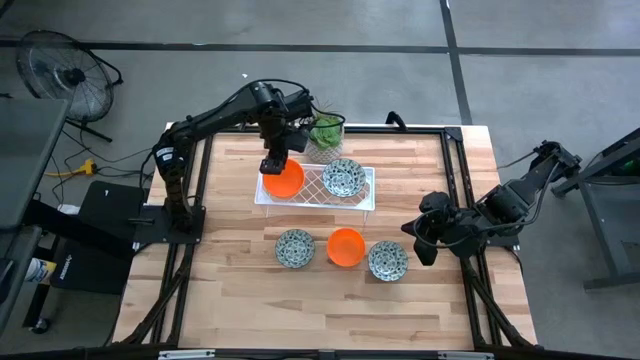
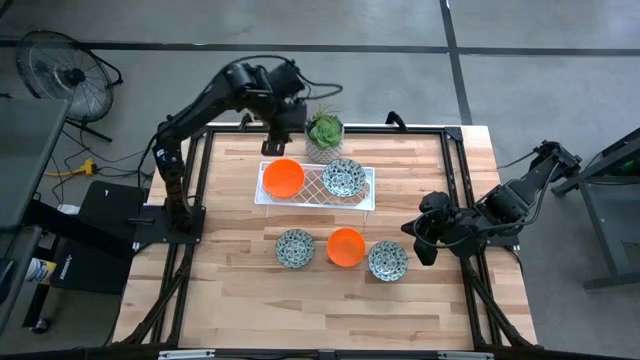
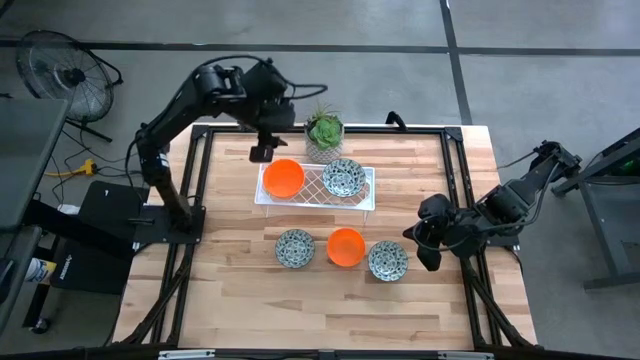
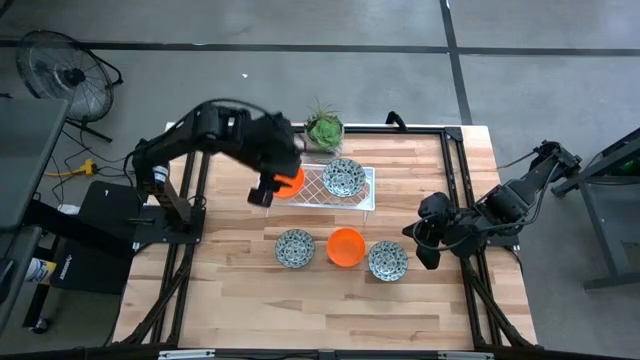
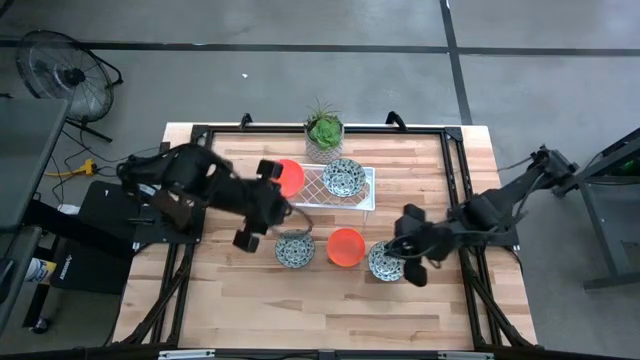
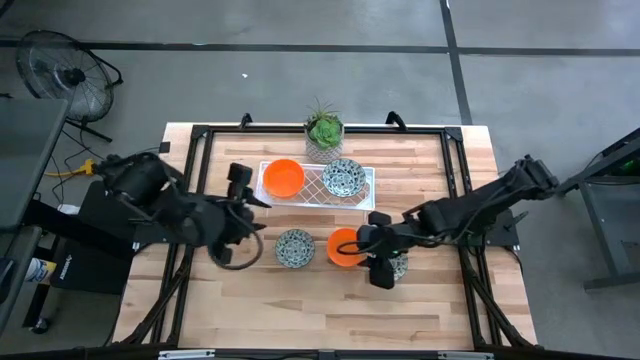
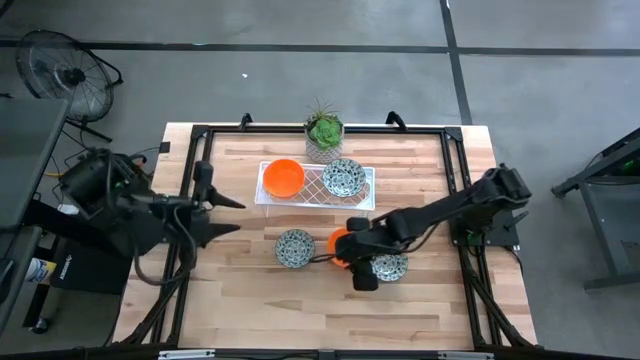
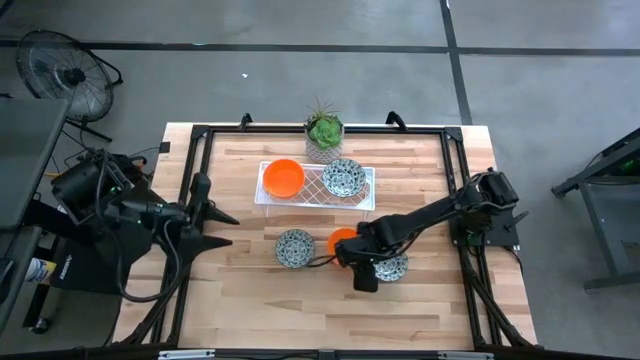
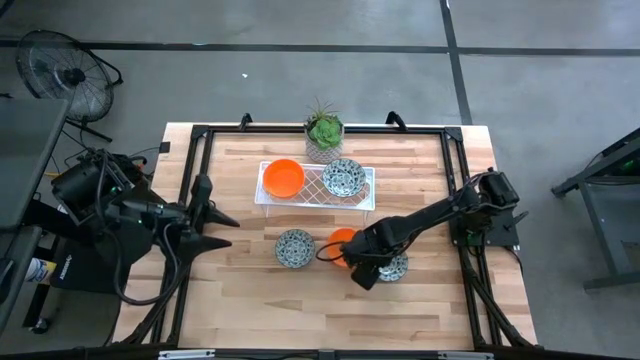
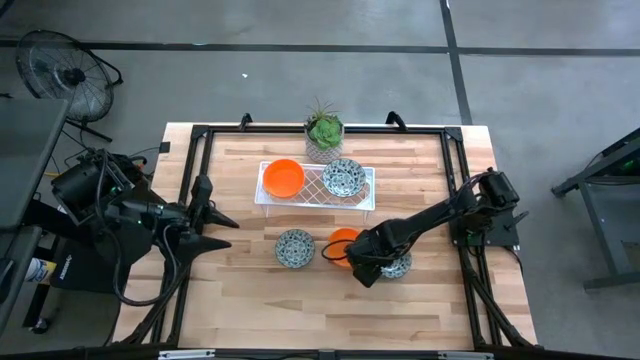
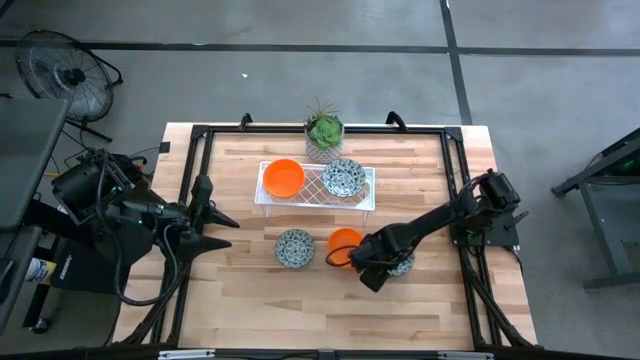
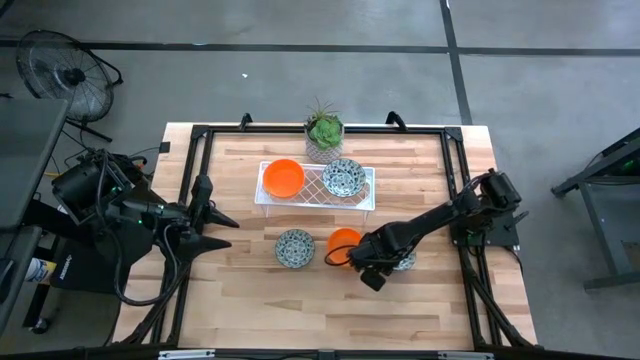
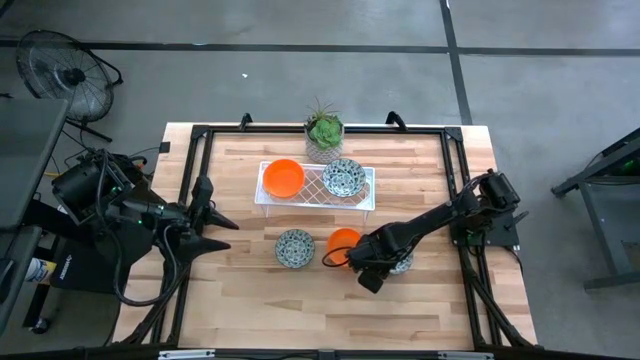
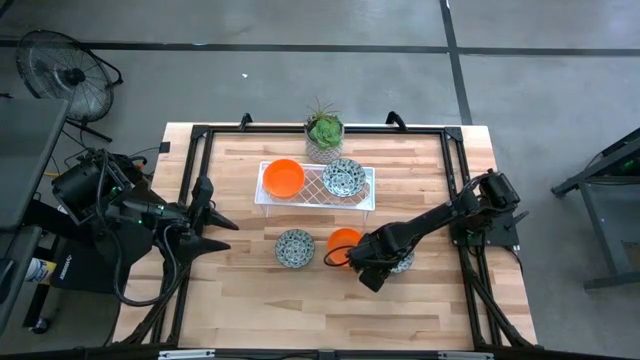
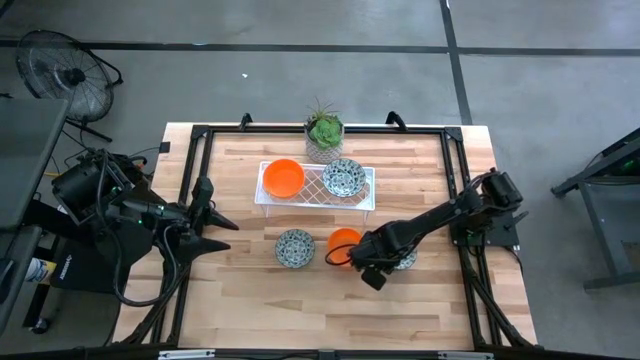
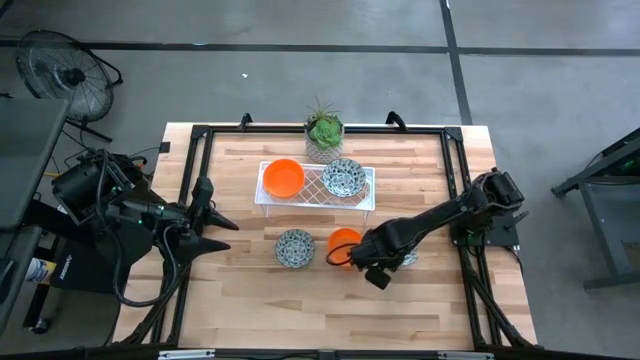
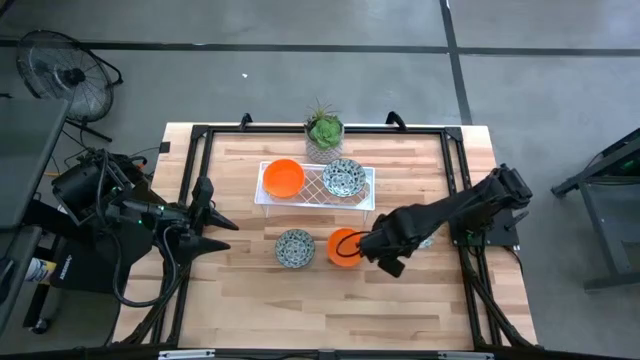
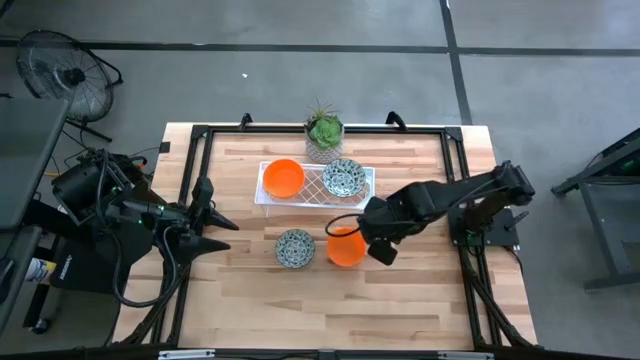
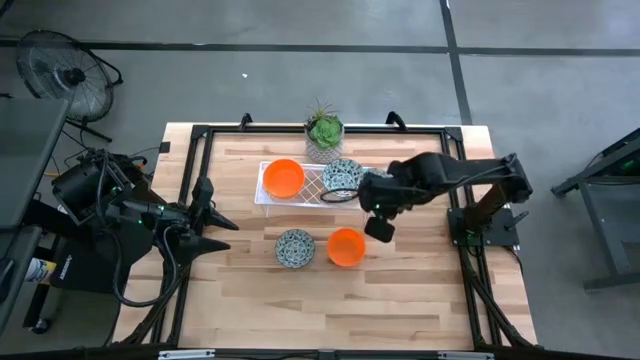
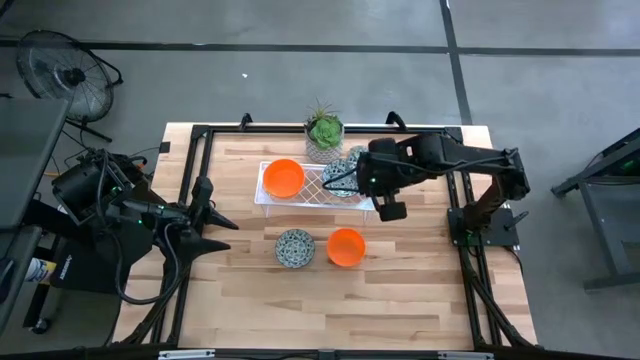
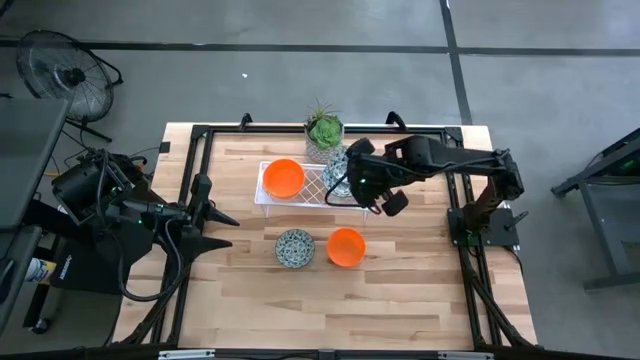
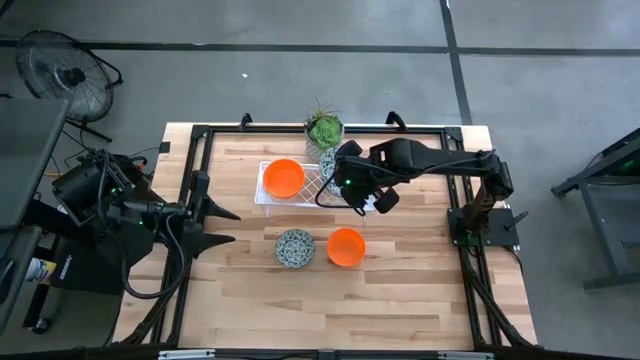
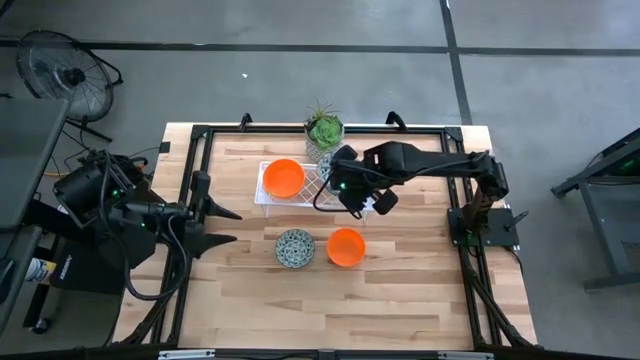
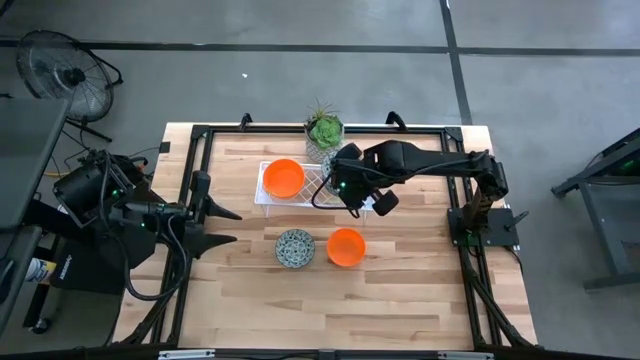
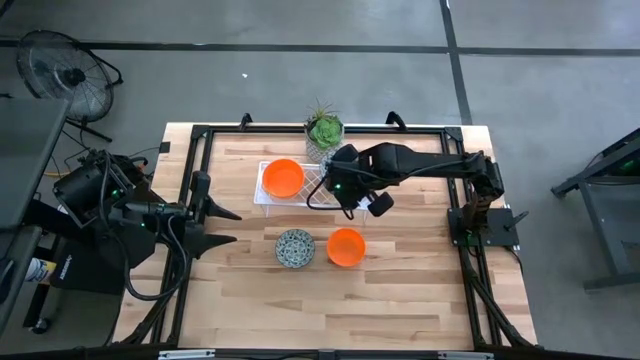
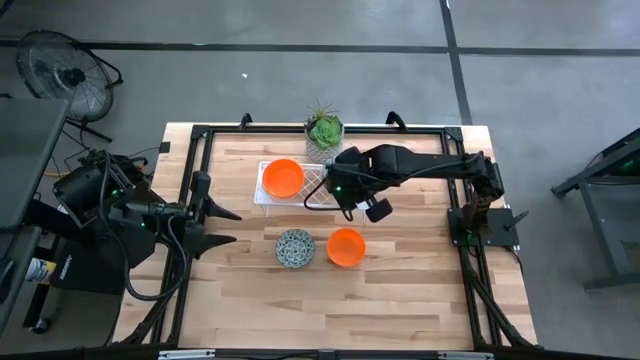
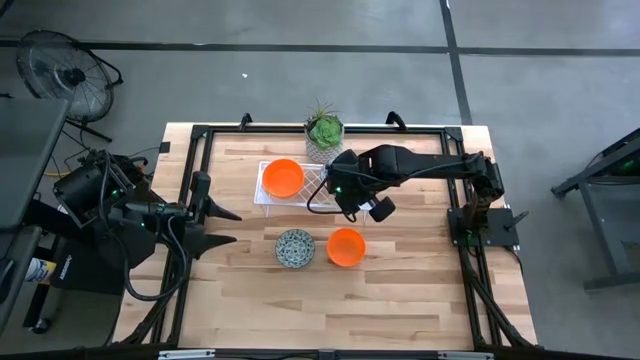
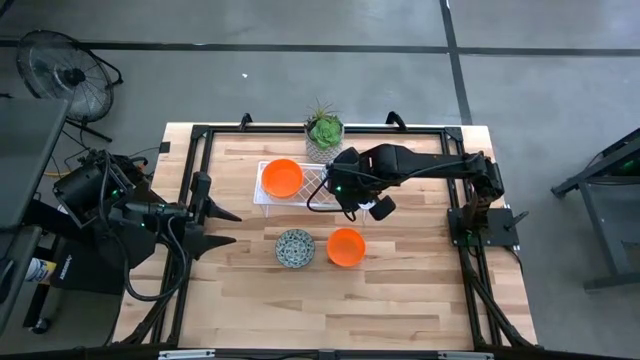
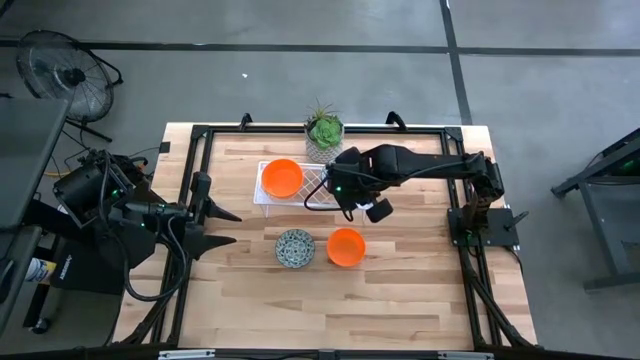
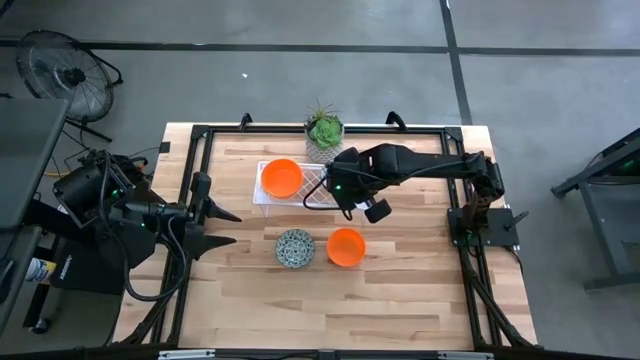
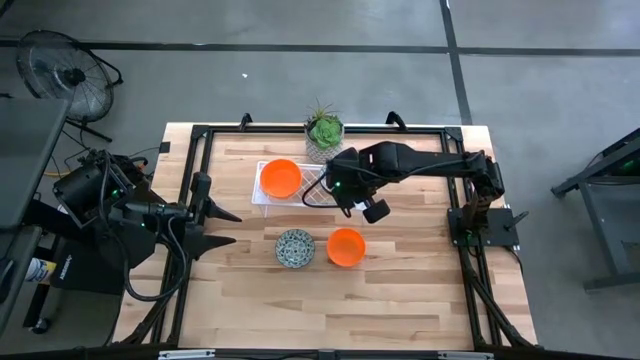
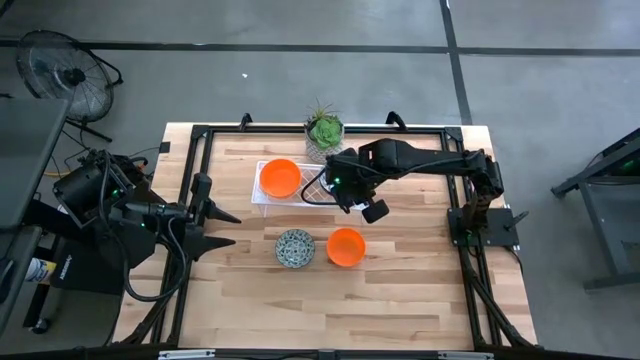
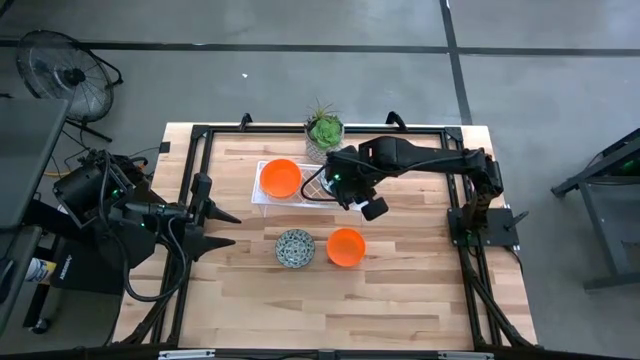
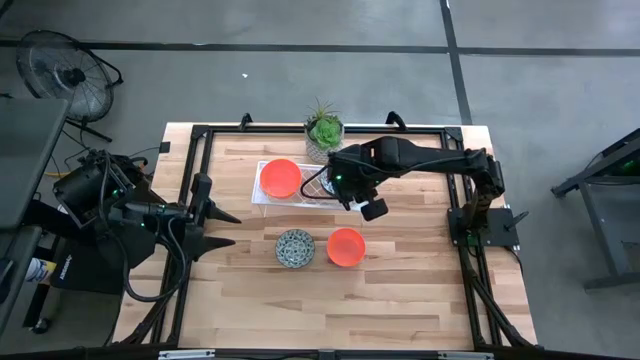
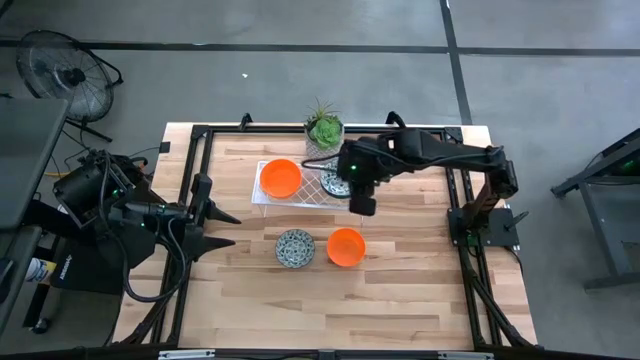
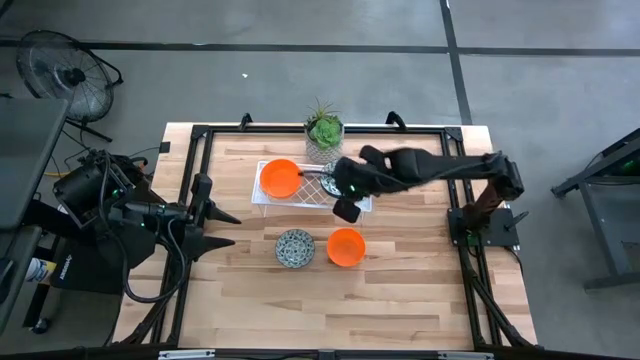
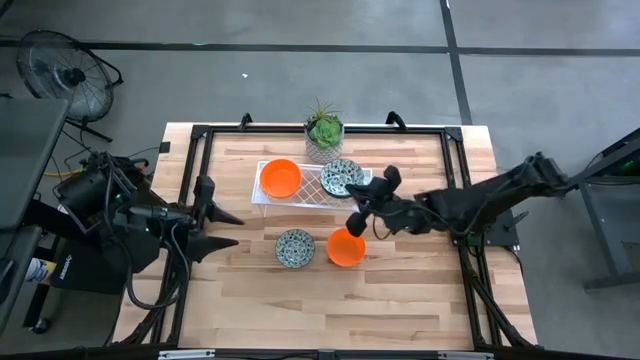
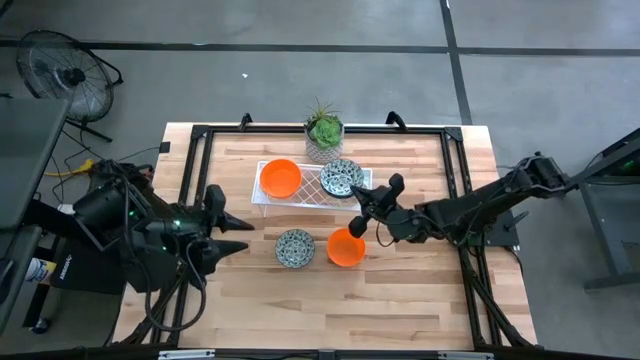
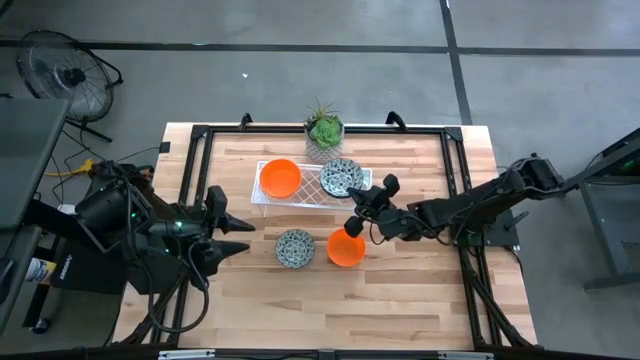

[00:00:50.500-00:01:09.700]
Task: Pick & Place Mini bowls
Stack the right blue bowl on the blue bowl on the shelf
